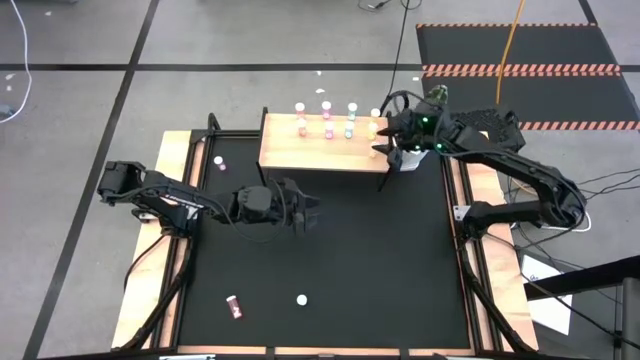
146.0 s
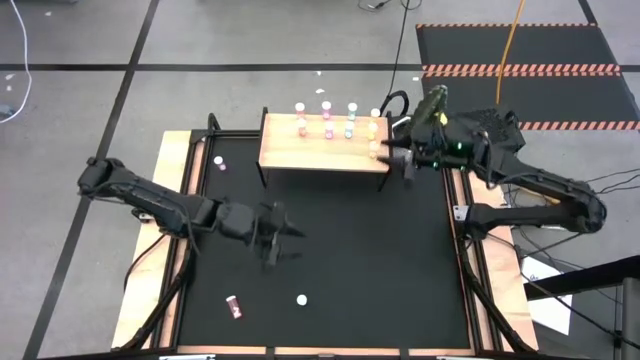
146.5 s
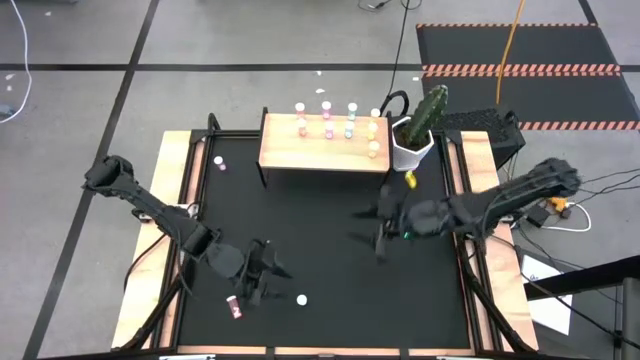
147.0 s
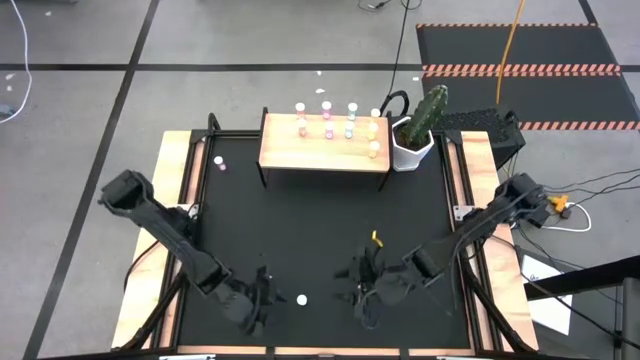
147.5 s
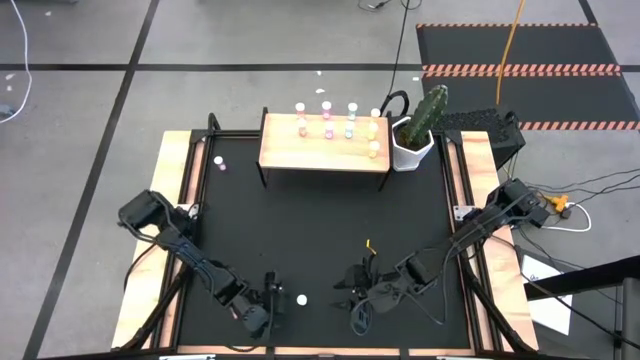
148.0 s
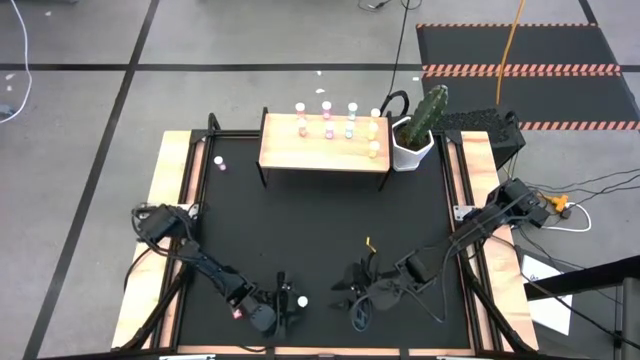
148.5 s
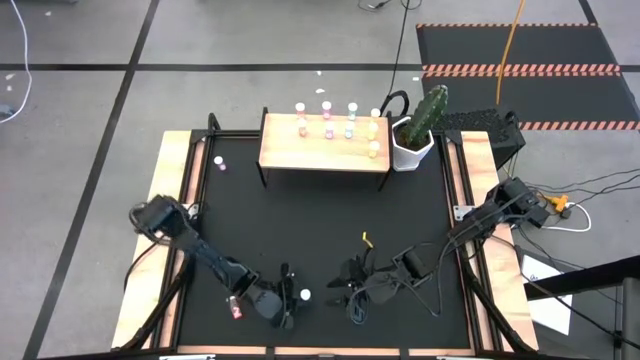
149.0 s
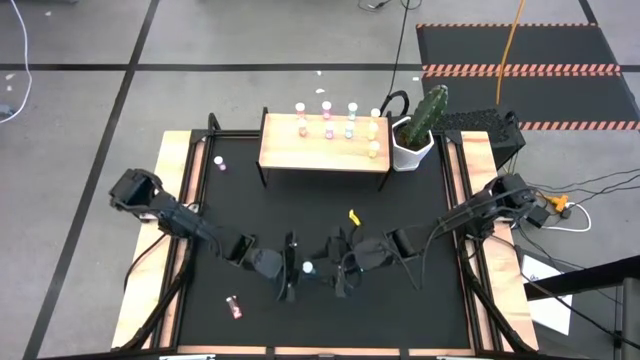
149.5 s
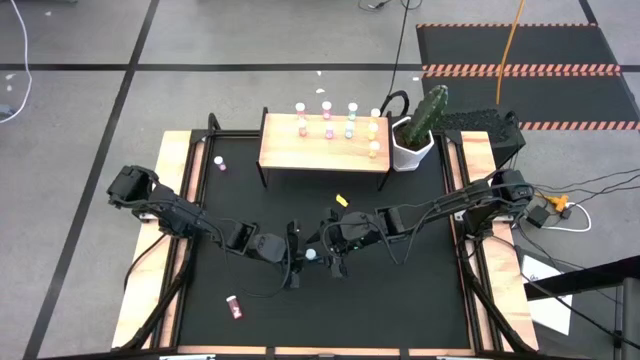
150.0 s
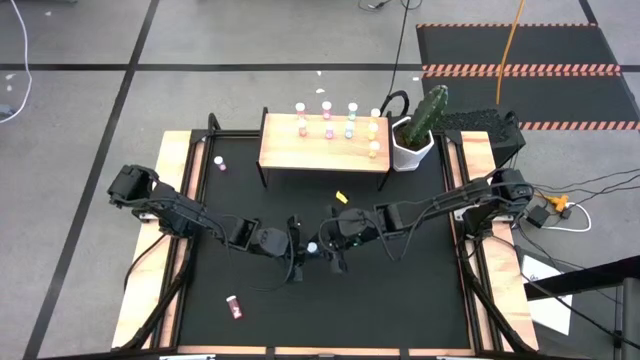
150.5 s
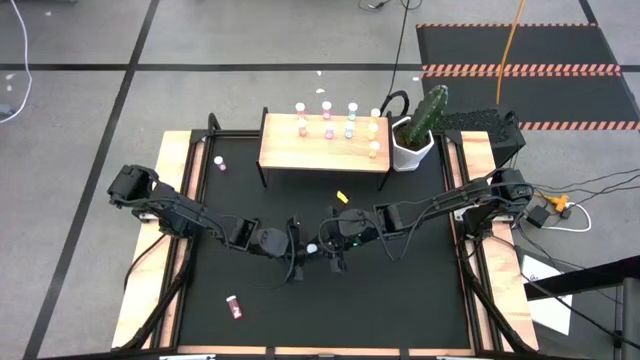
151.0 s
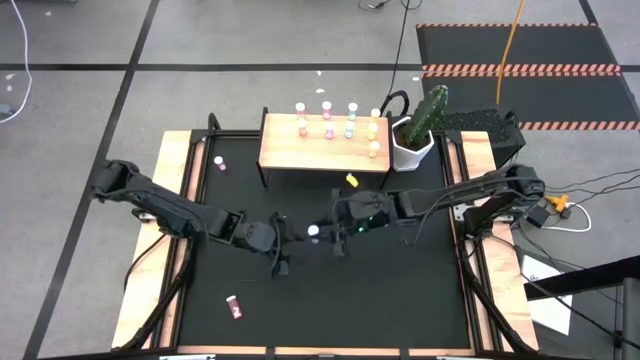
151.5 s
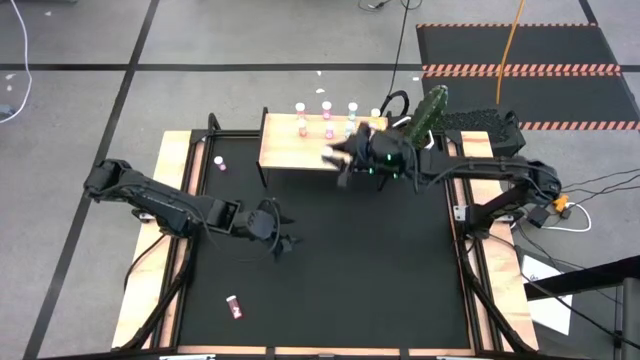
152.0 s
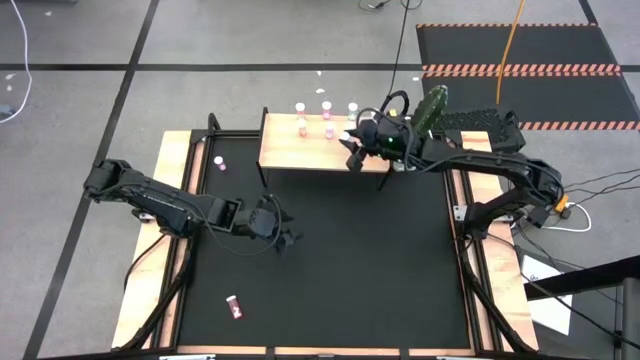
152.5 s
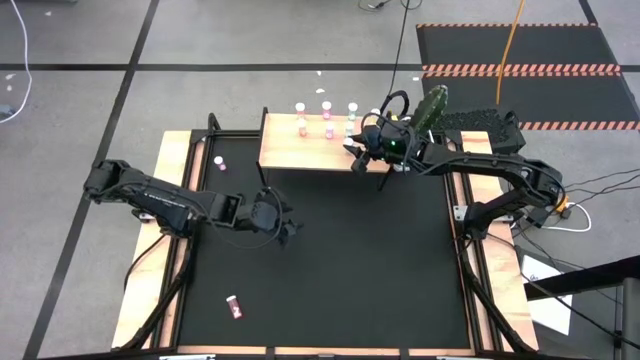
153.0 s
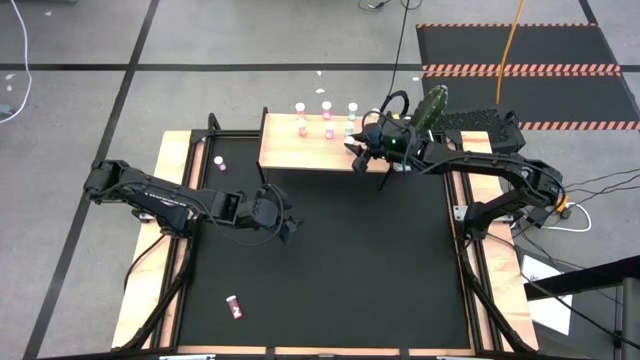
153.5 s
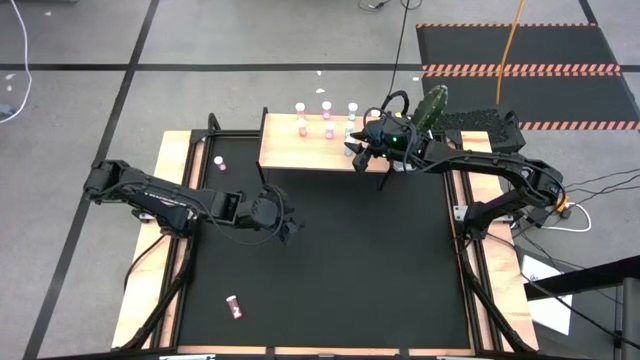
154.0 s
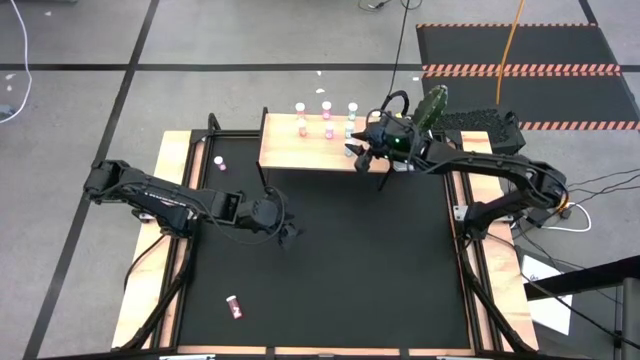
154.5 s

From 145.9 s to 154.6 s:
Task: Pick and place medicine bottles onto shelf by color
Put the blue pill bottle on the shelf aligned with the other blue pill bottles

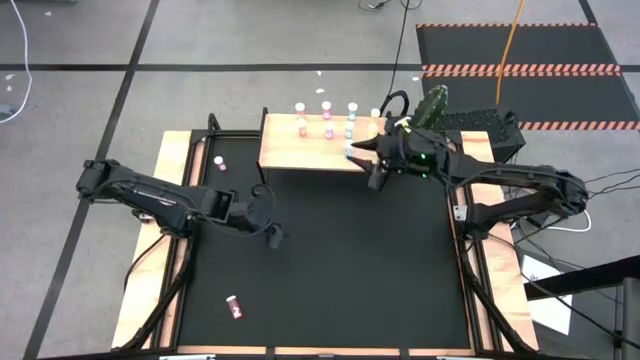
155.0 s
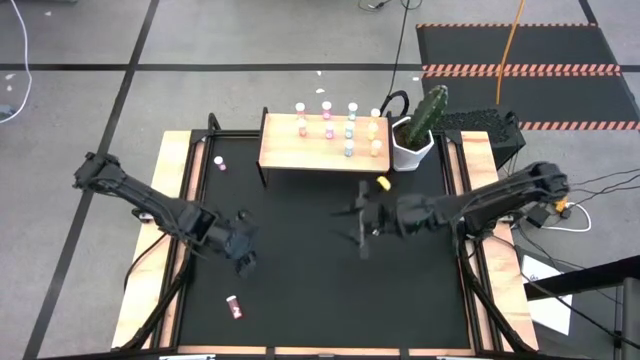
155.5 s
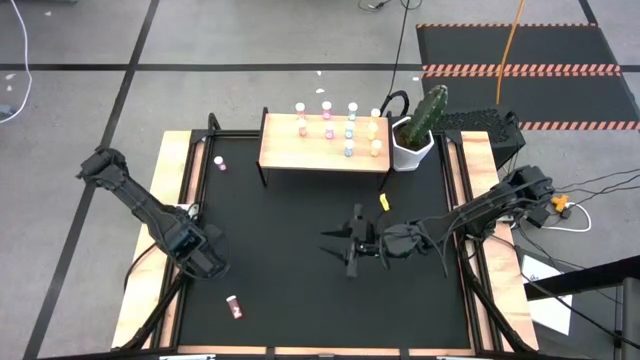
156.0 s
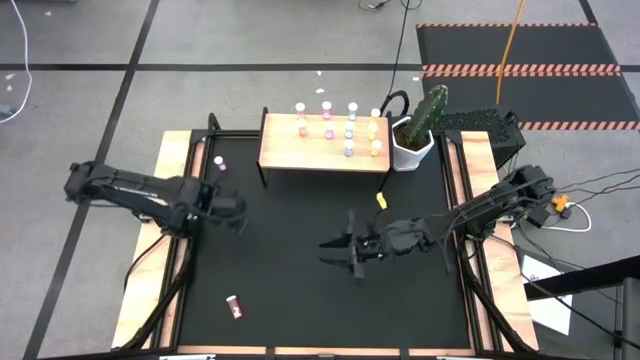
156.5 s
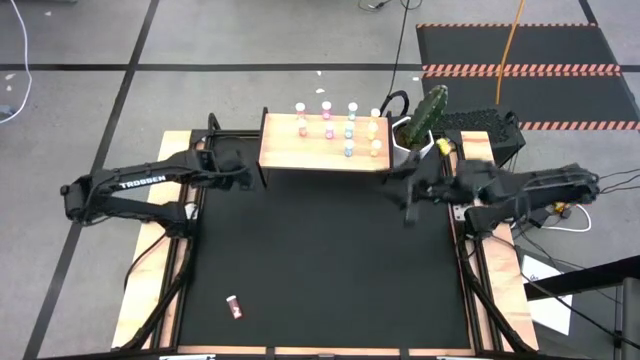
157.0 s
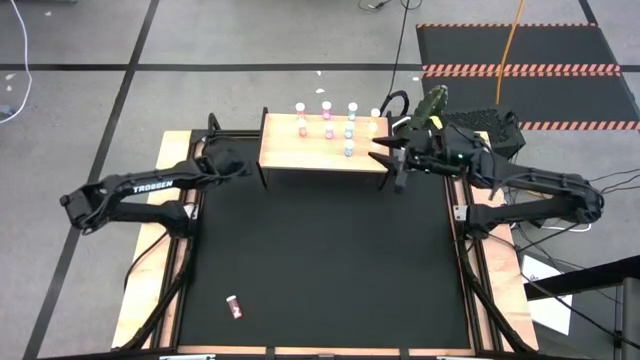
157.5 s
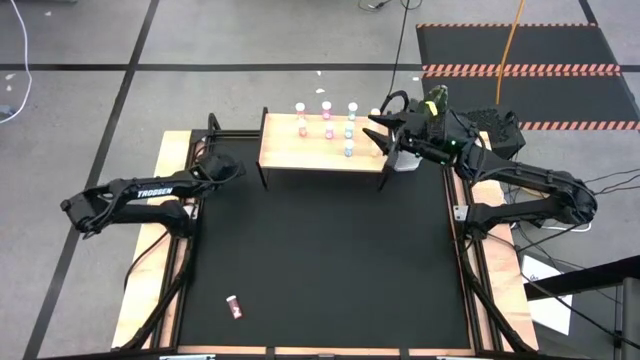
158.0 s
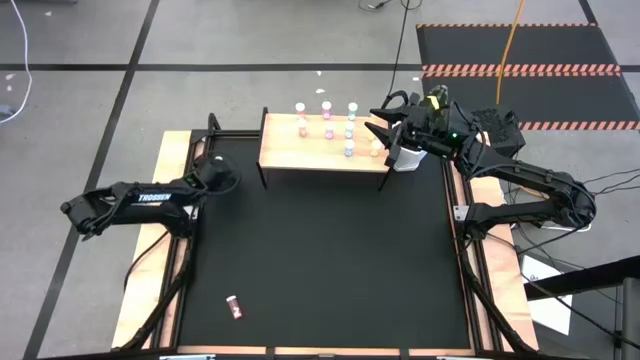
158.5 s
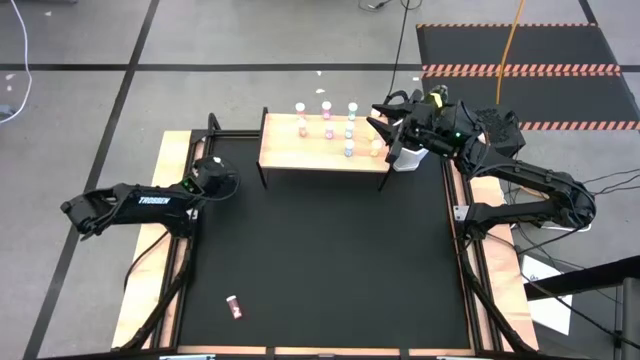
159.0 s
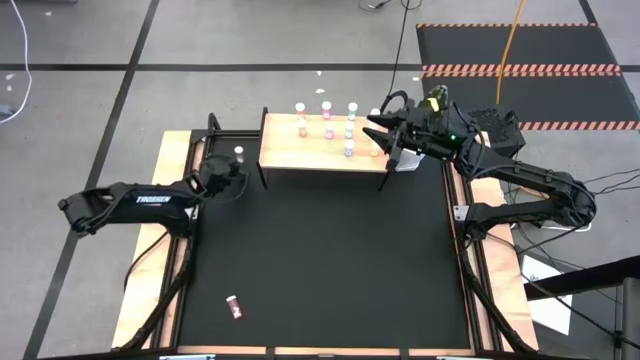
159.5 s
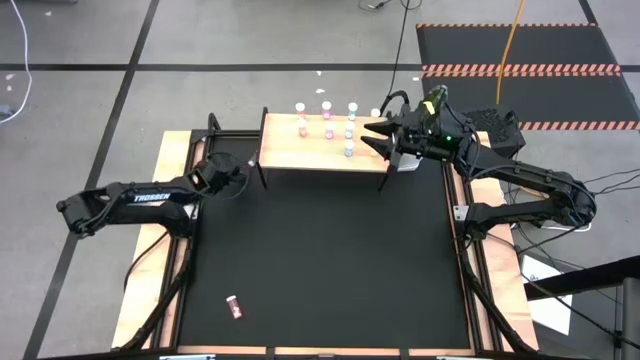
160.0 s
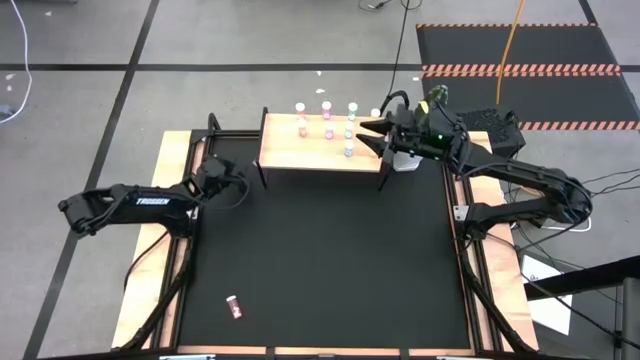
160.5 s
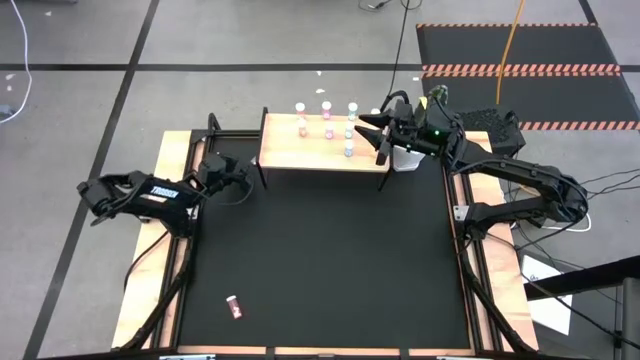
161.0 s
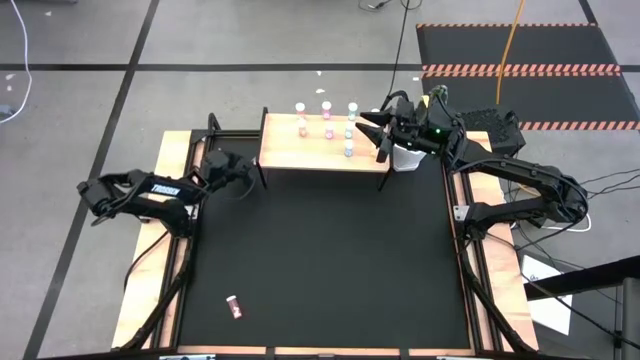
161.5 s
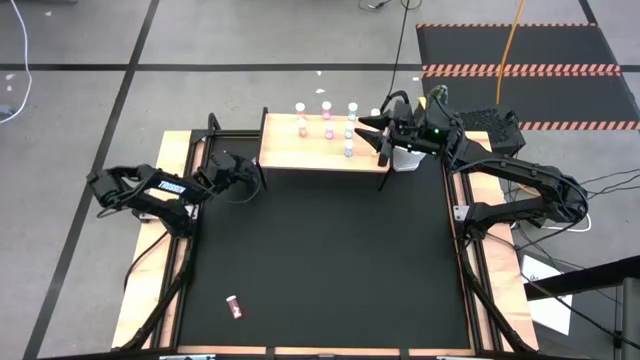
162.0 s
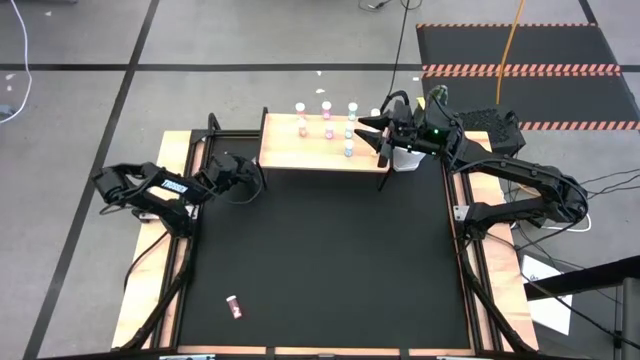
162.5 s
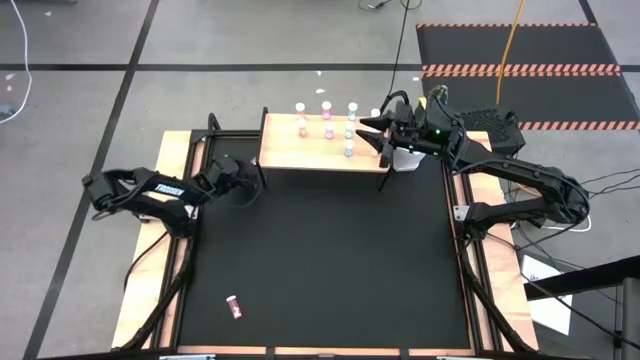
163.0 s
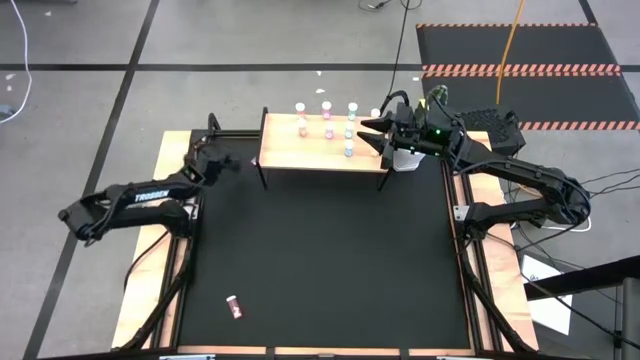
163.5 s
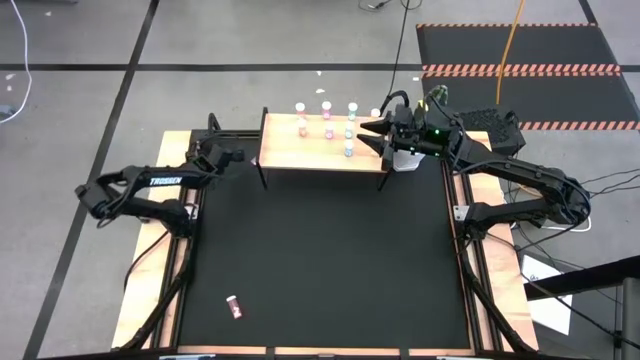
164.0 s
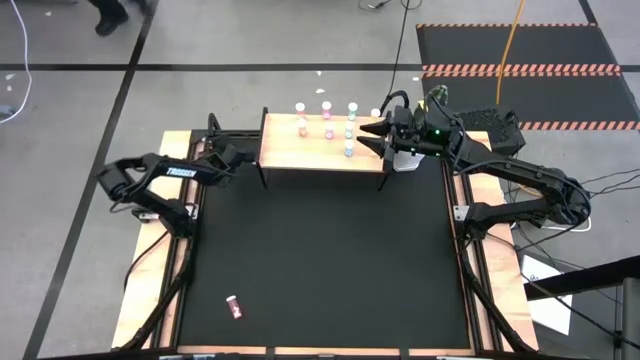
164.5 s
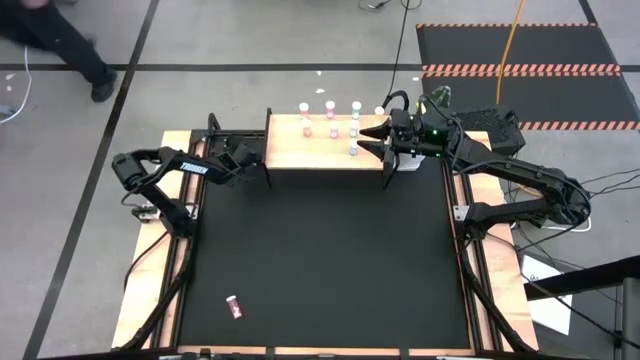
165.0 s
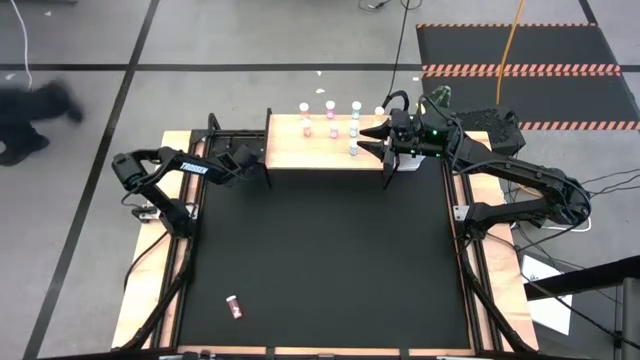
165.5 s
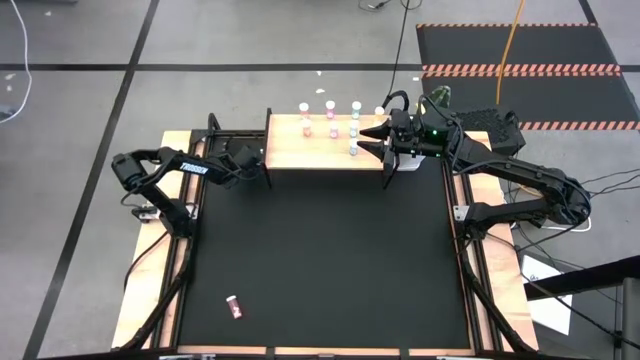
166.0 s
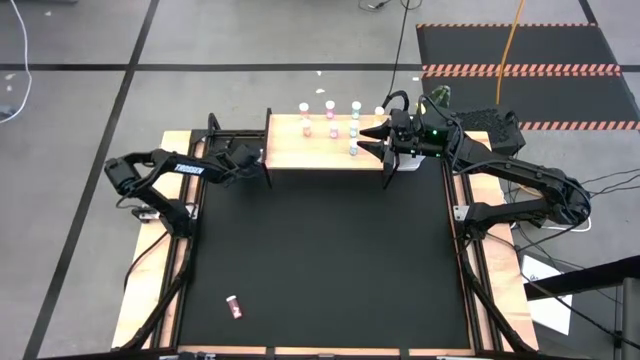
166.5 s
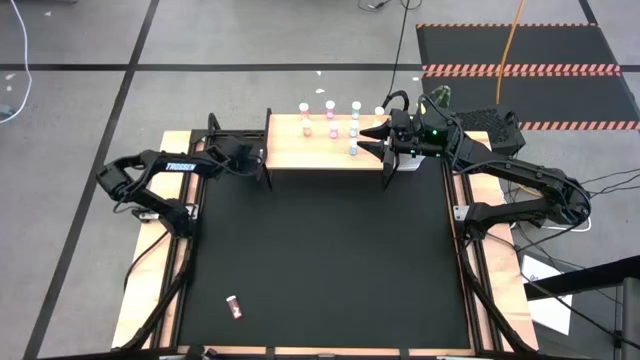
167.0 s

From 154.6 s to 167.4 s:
Put the purple pill bottle on the shelf aligned with the other purple pill bottles
